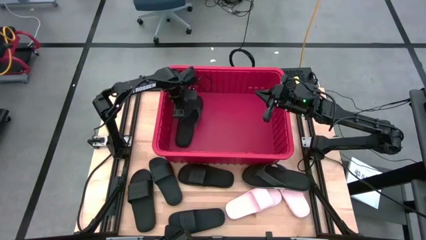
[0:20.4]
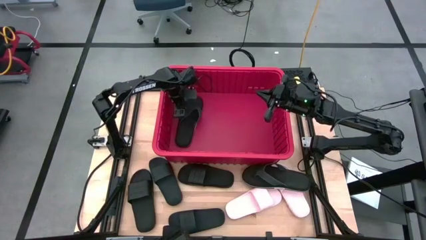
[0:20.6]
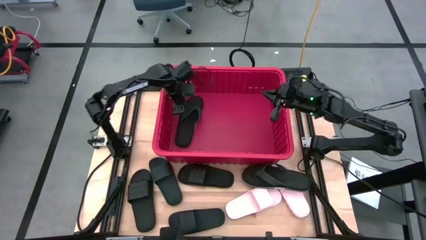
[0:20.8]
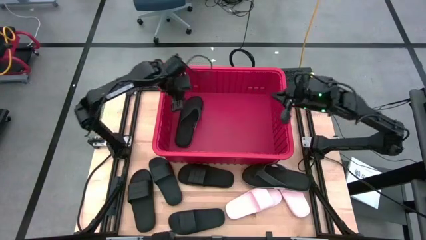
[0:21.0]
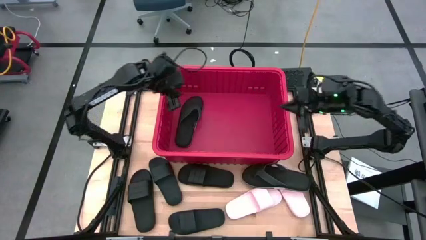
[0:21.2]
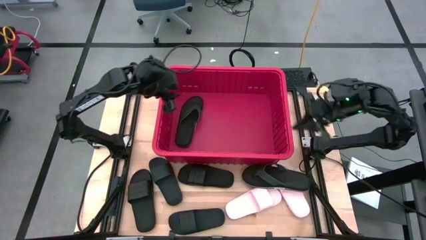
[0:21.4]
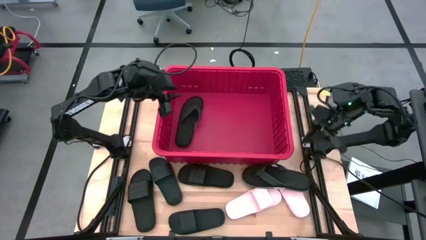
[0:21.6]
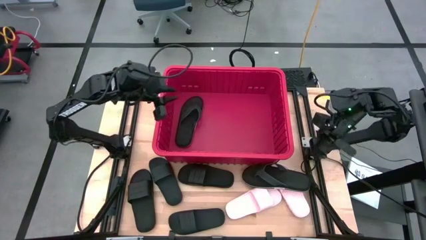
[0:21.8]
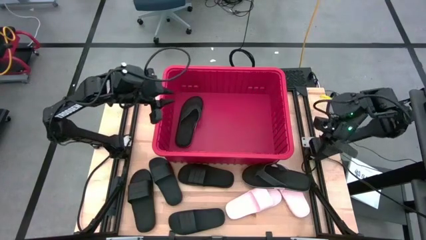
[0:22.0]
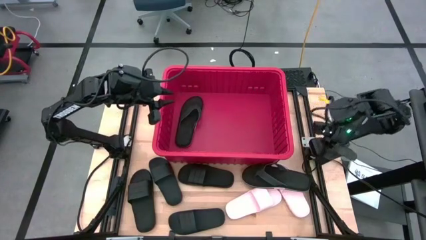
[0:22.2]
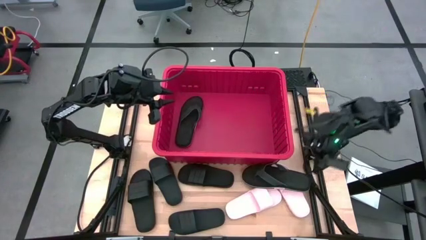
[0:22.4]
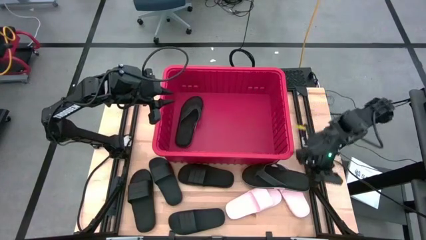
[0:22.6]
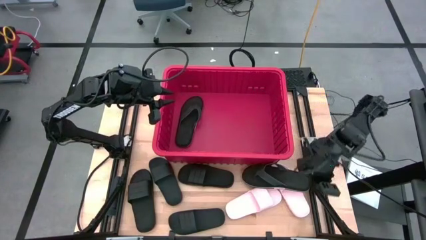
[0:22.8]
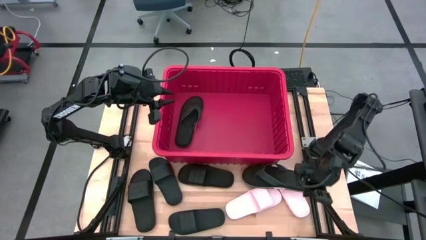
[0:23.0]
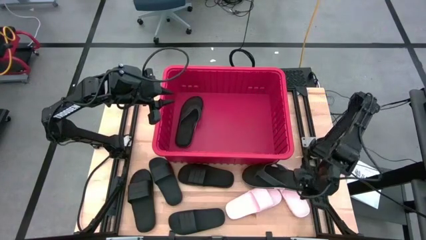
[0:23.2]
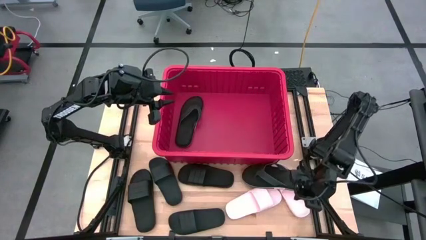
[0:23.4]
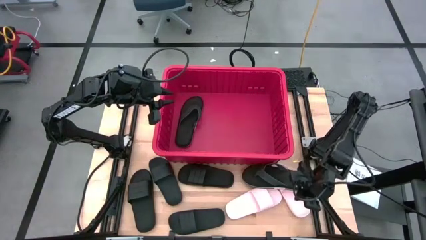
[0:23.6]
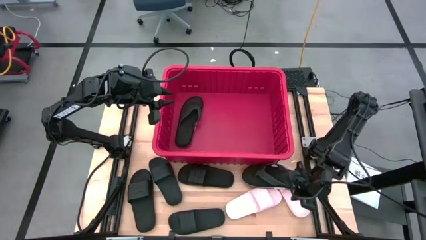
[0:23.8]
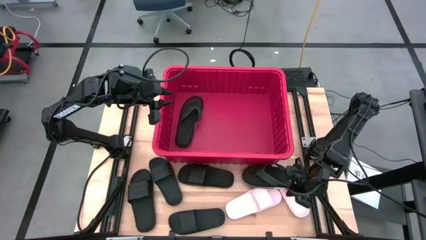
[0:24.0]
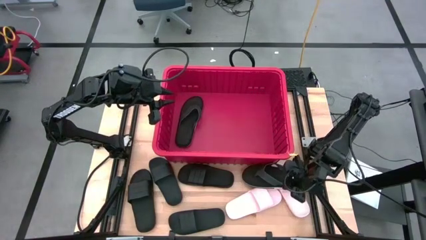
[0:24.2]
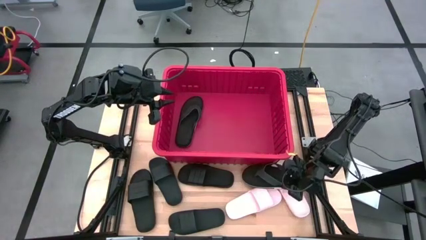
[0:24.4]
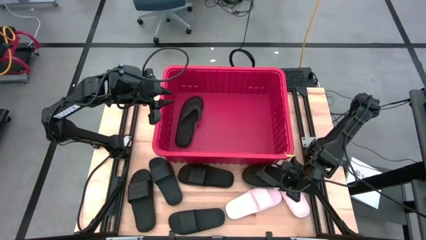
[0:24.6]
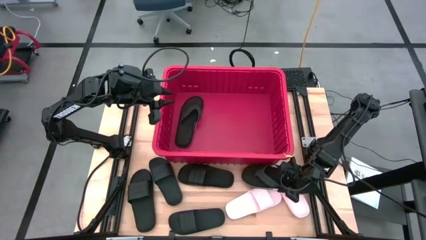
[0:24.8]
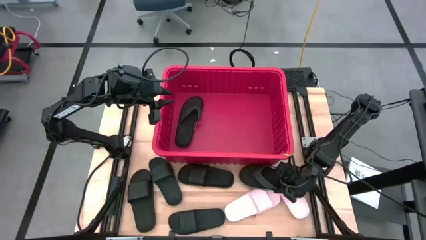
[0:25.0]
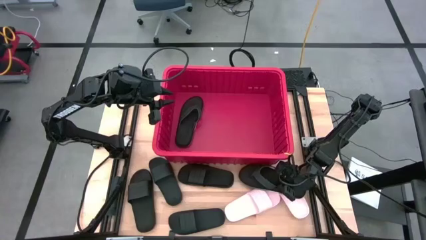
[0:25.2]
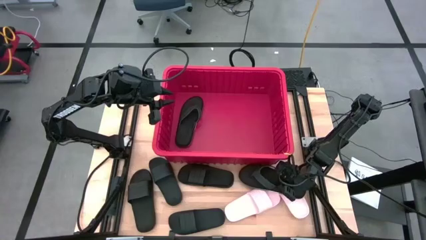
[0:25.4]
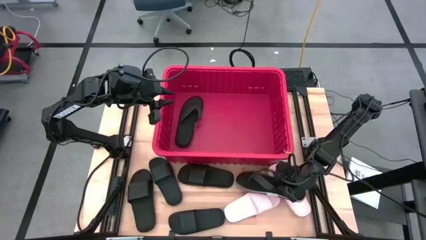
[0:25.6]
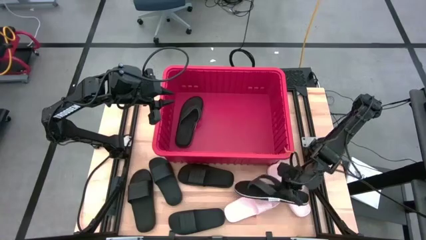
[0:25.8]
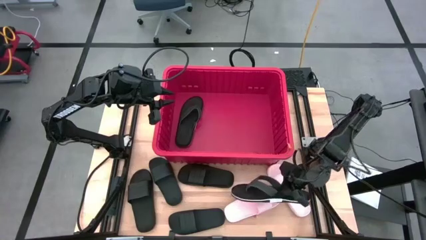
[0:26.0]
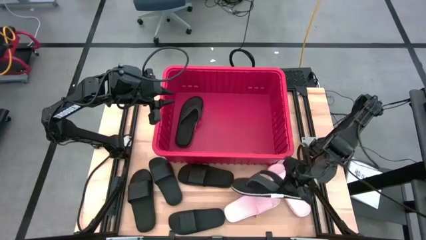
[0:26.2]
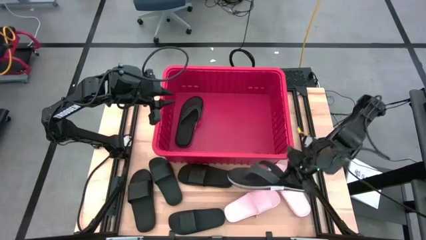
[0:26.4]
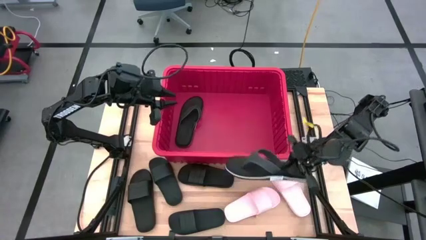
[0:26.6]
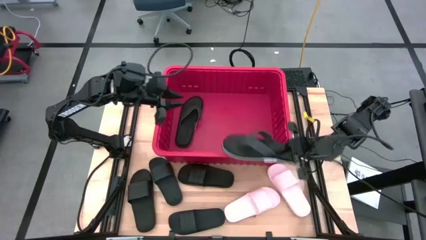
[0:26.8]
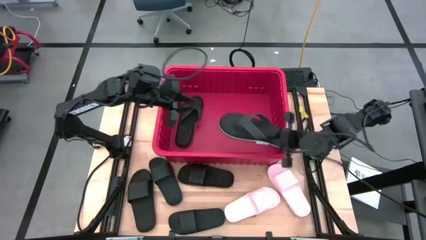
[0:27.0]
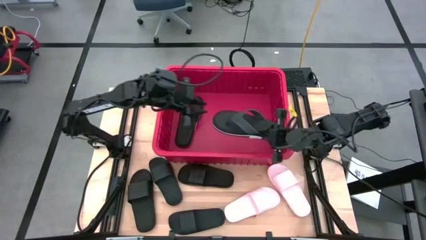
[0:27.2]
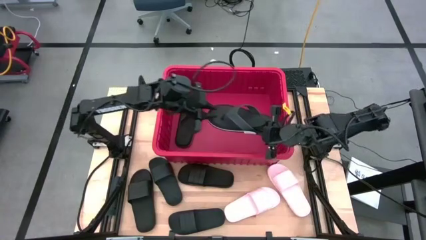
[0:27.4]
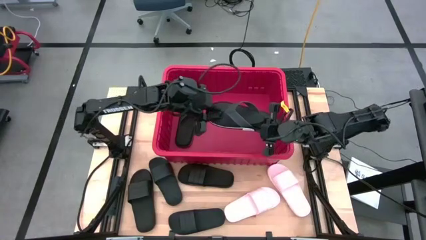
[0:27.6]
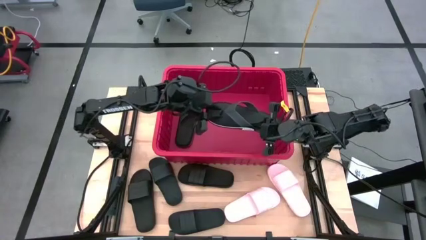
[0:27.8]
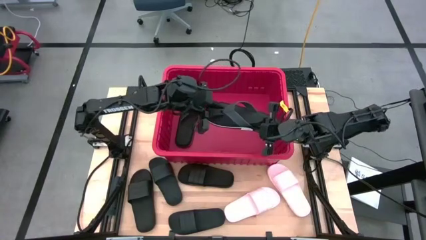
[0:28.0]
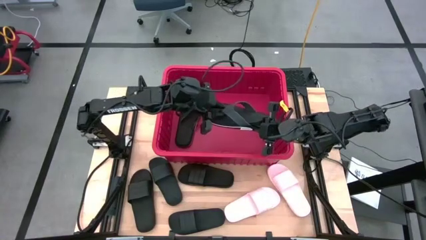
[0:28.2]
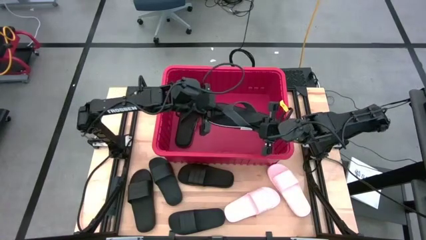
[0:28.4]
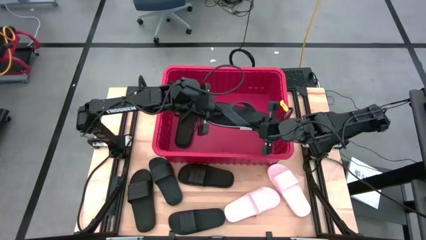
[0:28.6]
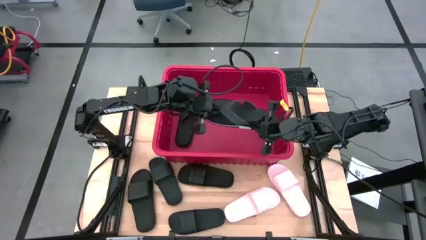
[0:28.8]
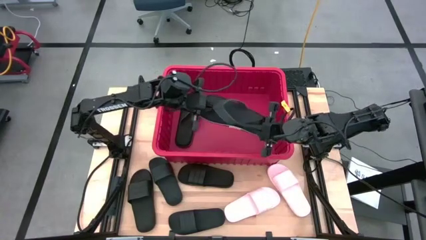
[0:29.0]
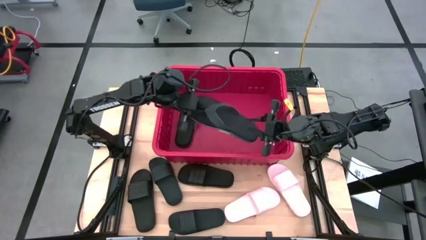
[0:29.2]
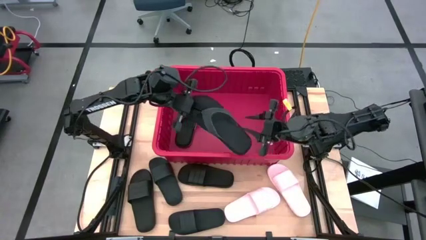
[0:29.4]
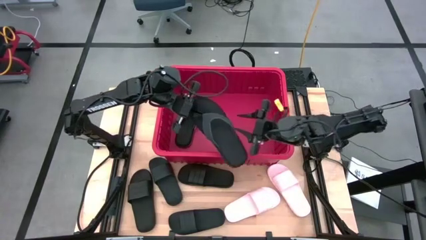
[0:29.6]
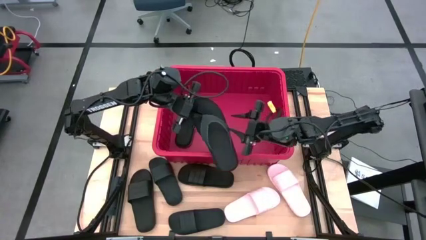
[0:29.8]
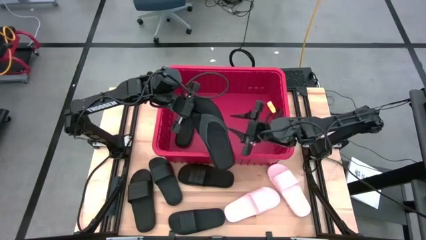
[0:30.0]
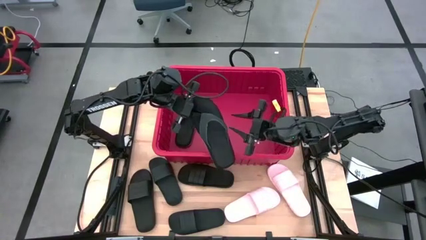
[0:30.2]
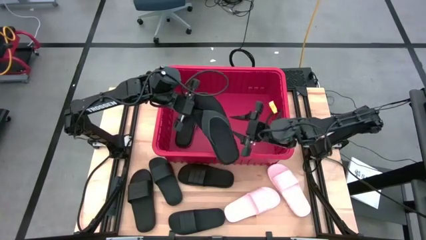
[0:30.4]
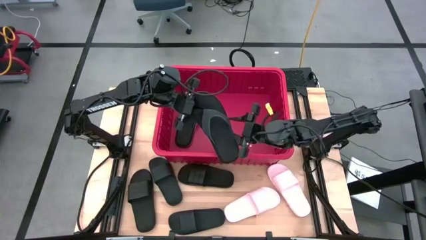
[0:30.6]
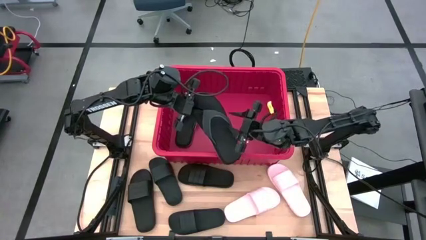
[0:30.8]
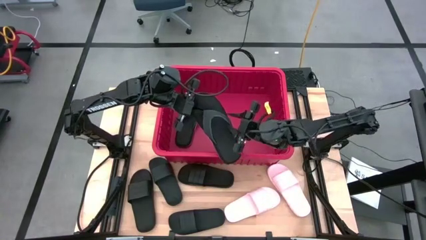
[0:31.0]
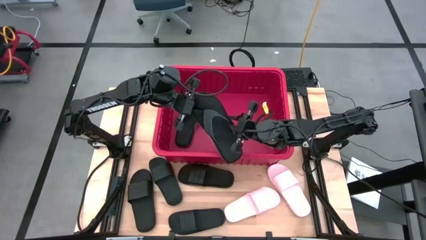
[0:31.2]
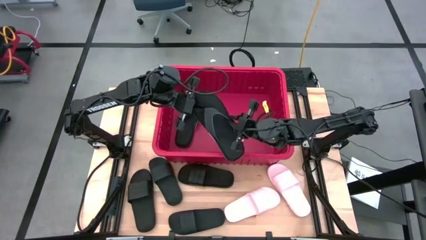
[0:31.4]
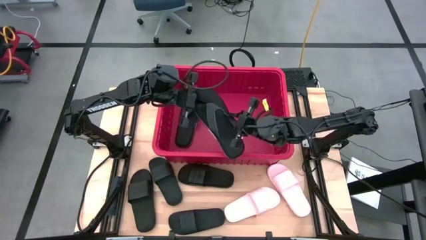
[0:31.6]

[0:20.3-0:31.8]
Task: Pick and place slides into bin
Put the black slipper into the red bin
